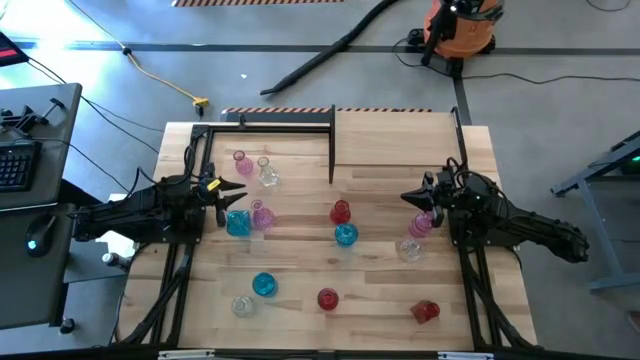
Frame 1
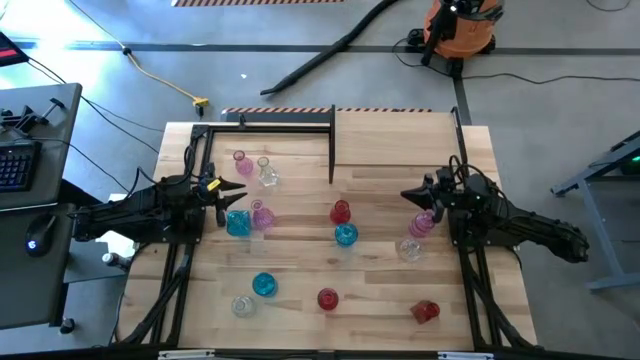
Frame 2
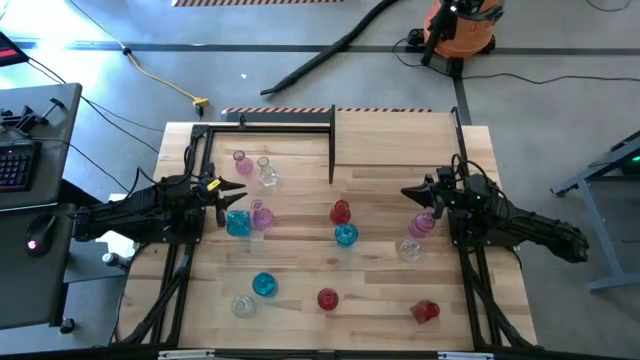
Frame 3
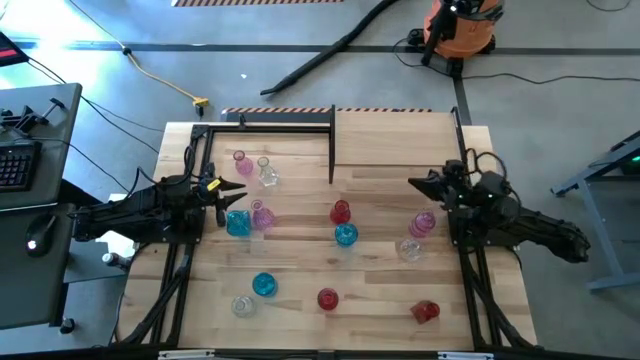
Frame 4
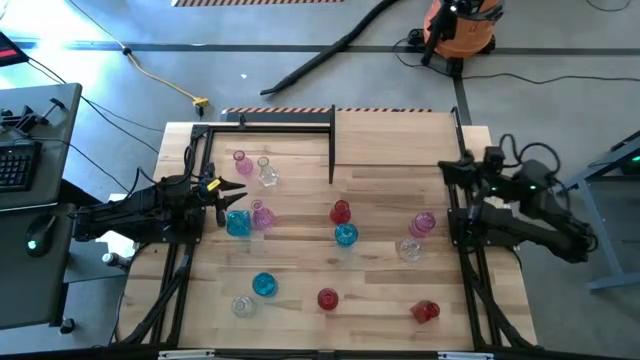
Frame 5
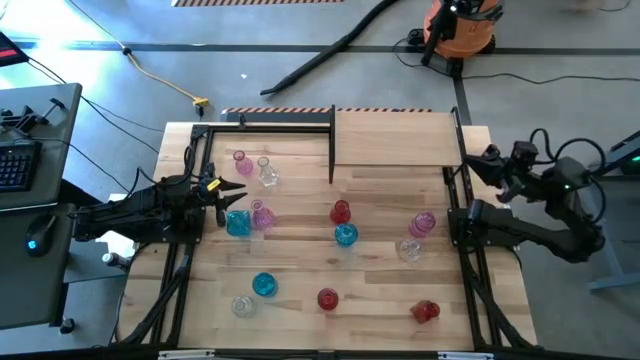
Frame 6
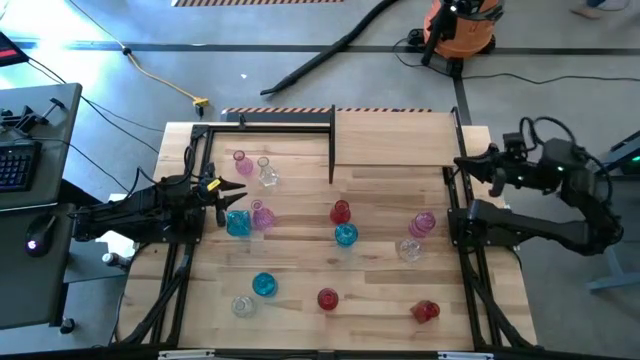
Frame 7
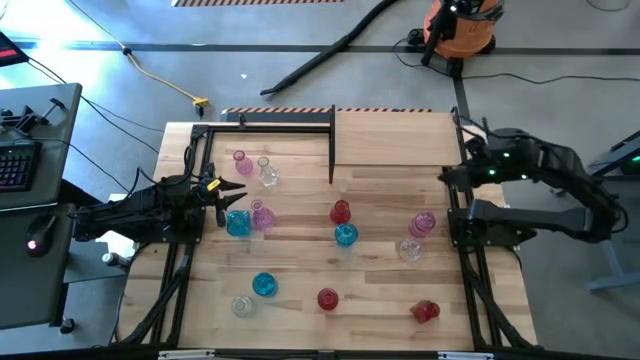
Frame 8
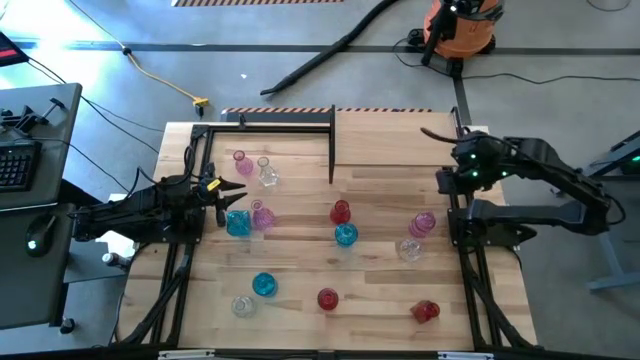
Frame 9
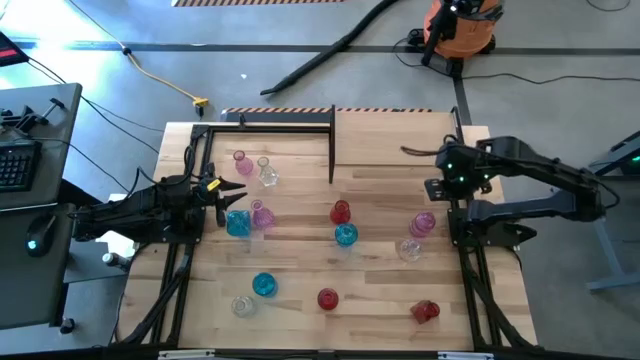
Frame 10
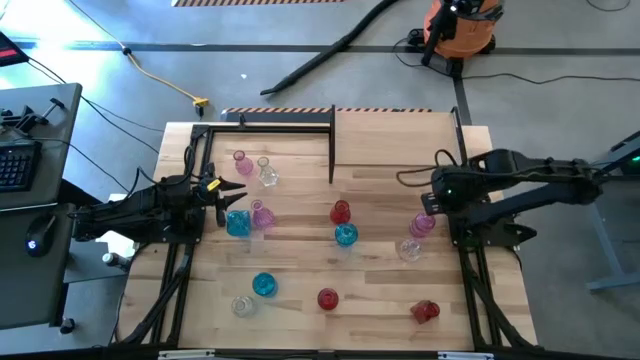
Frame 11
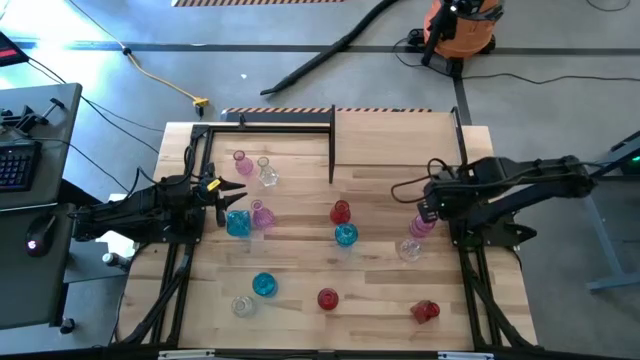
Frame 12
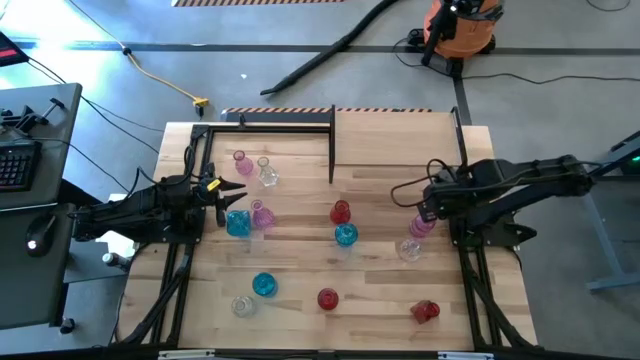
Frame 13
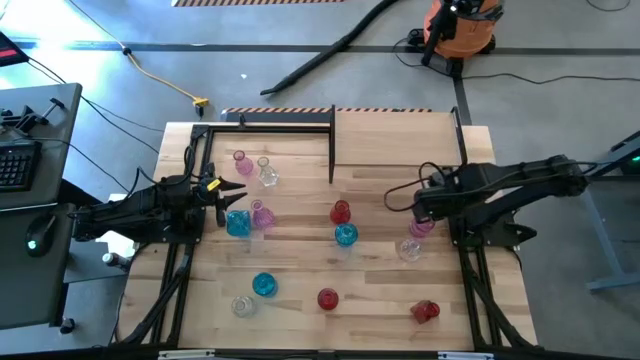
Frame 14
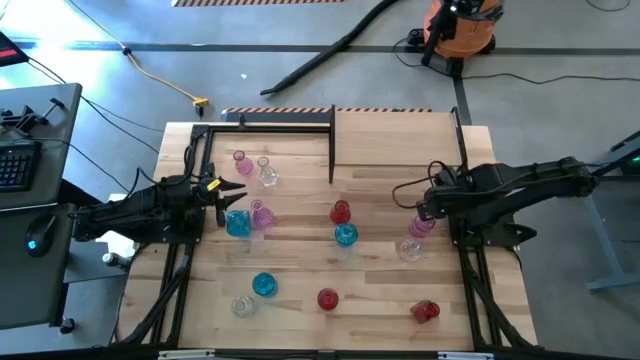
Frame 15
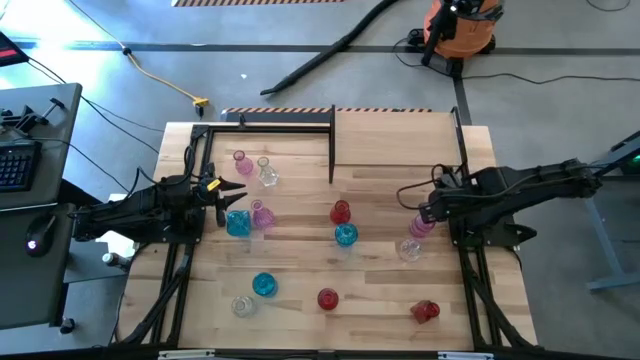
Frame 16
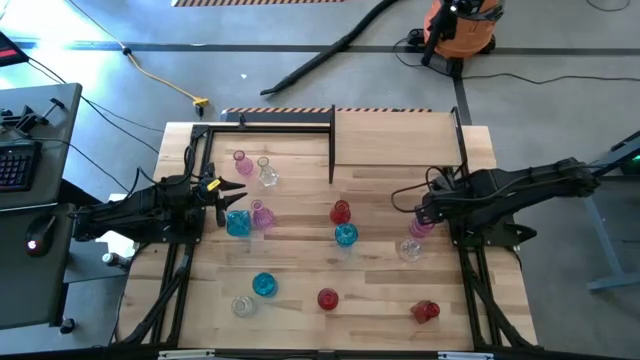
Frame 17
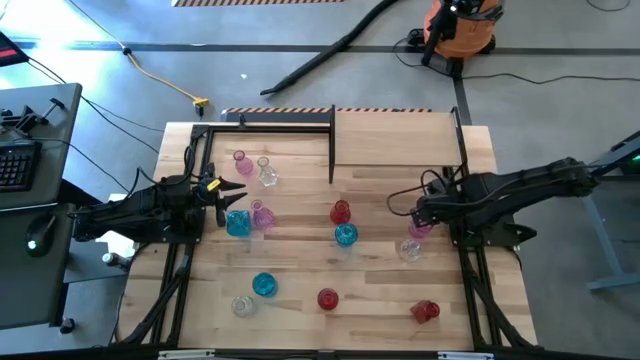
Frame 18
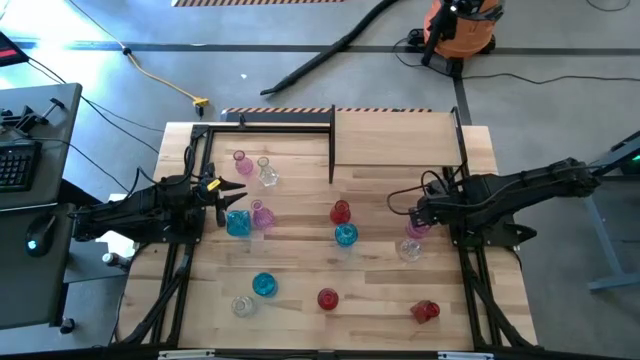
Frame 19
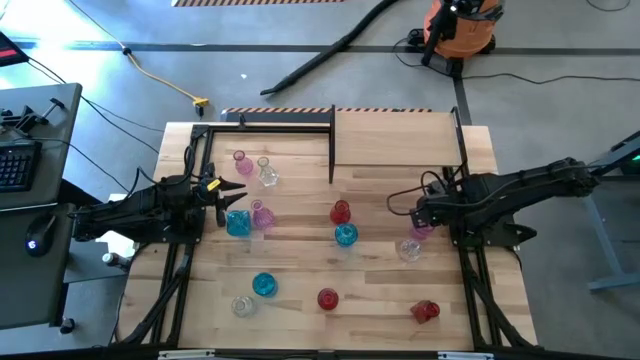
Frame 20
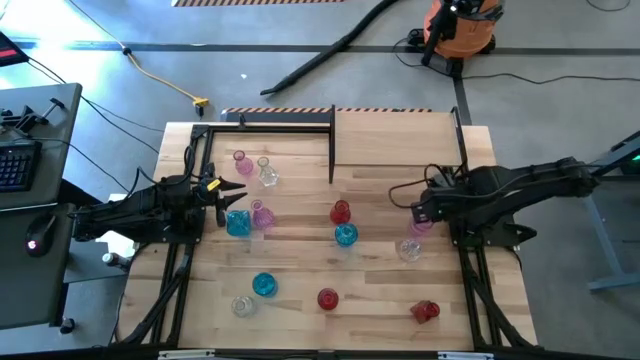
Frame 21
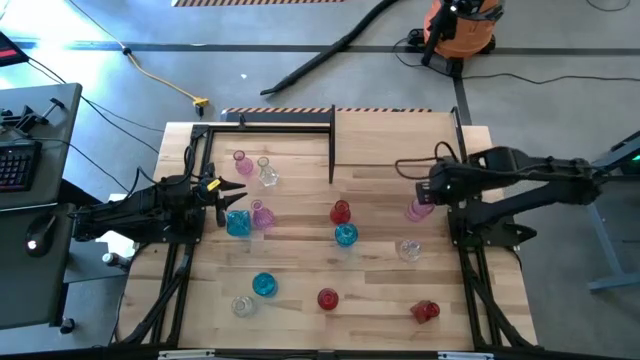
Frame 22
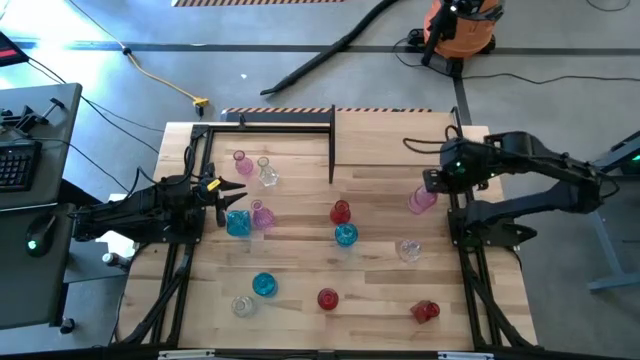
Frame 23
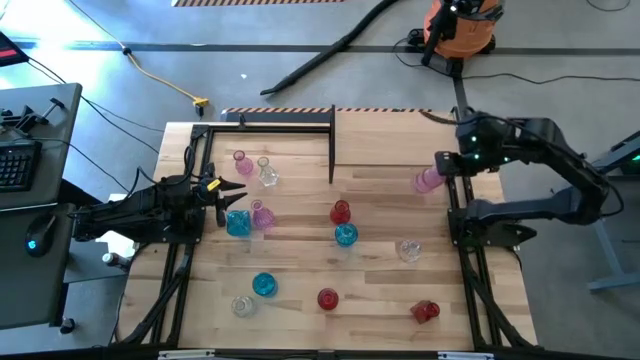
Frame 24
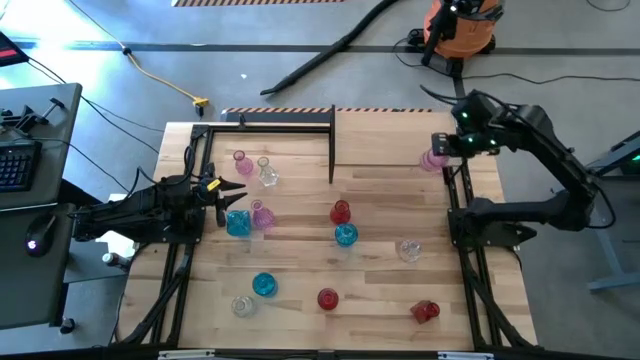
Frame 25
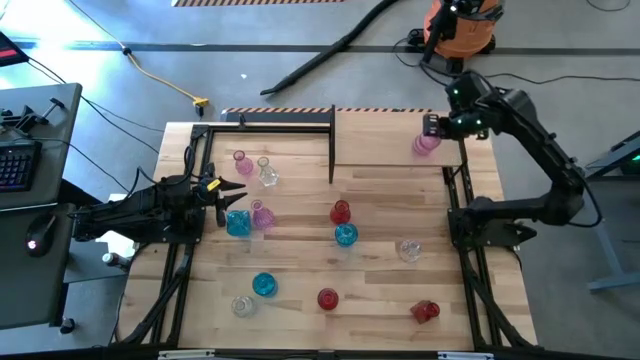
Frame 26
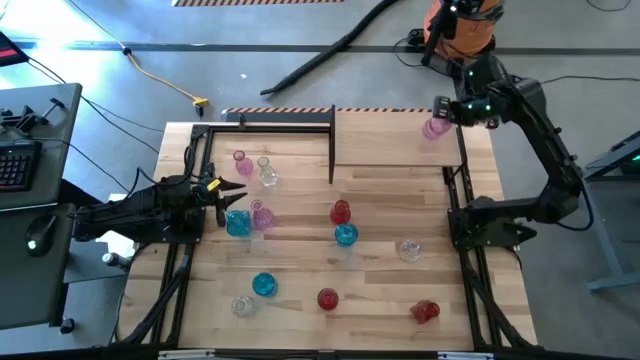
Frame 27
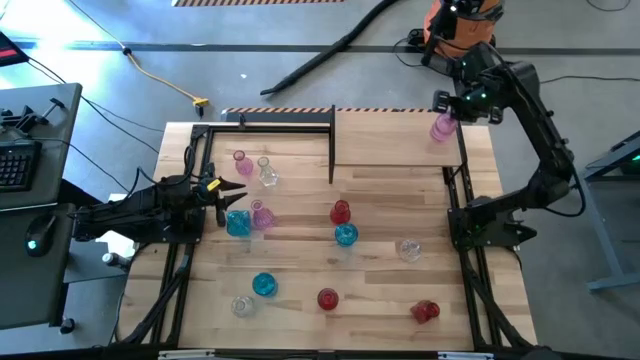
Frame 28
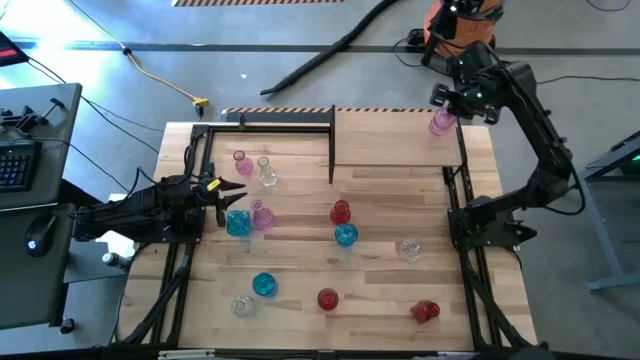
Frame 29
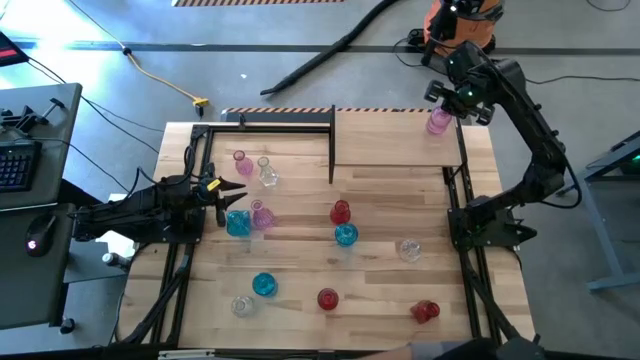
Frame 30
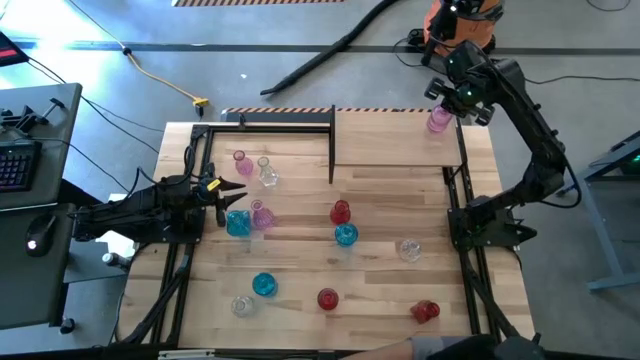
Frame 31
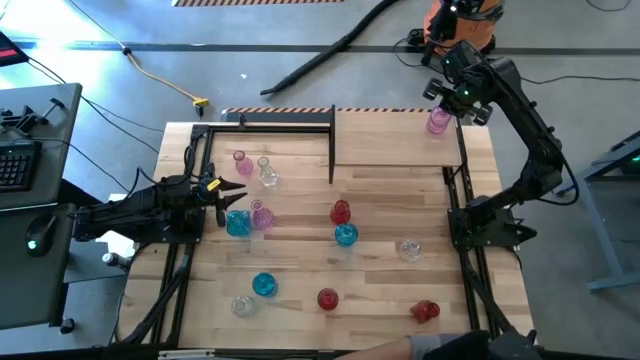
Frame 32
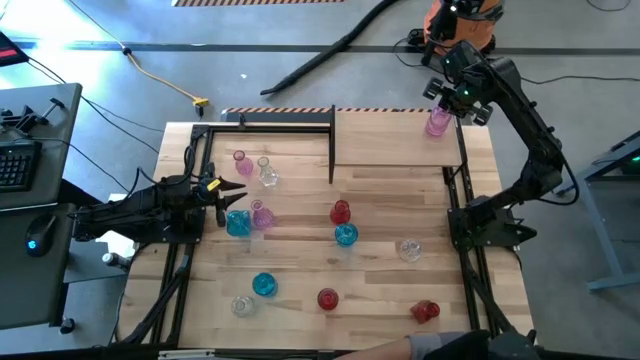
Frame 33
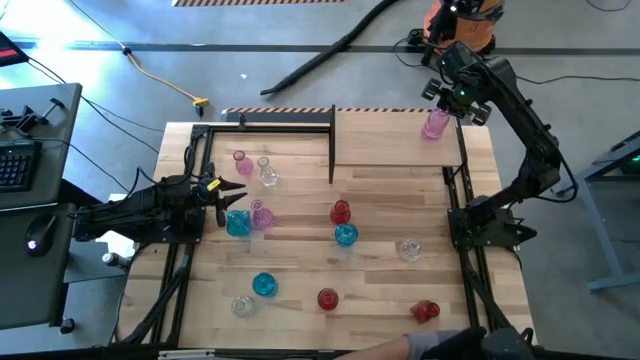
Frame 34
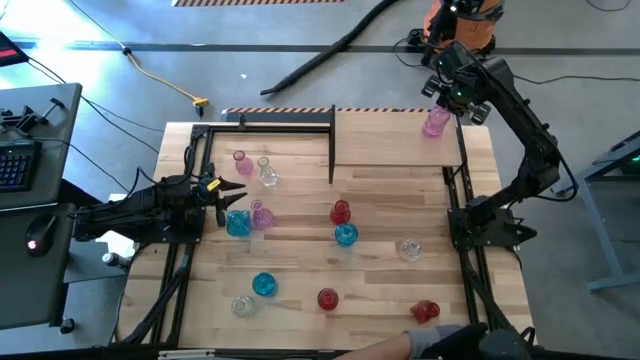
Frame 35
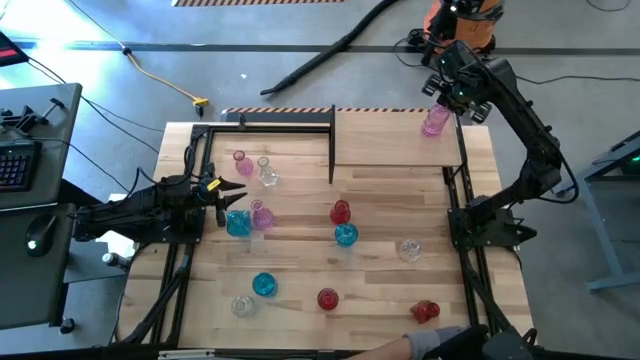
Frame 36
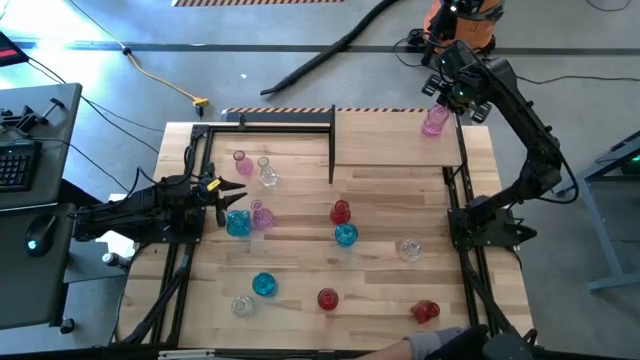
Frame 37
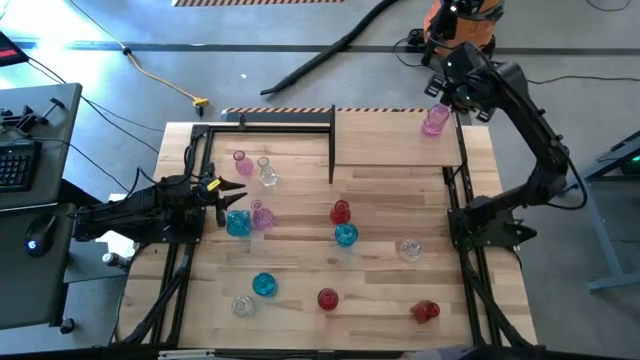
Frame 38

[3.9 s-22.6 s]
Task: sort vases onto shelf
Put the bottom right purple vase on the shelf
